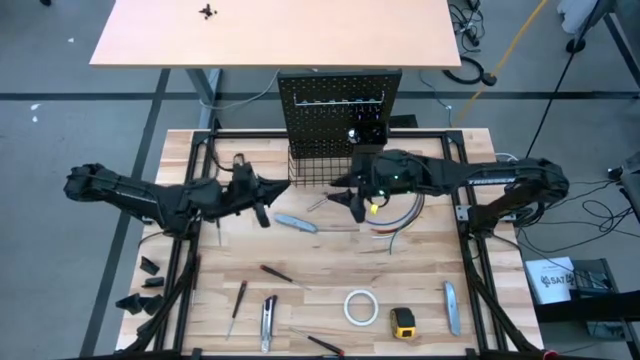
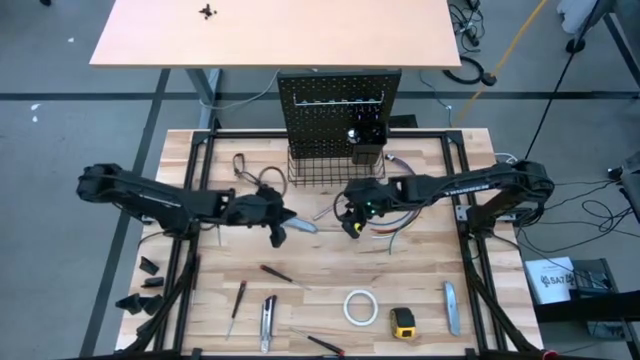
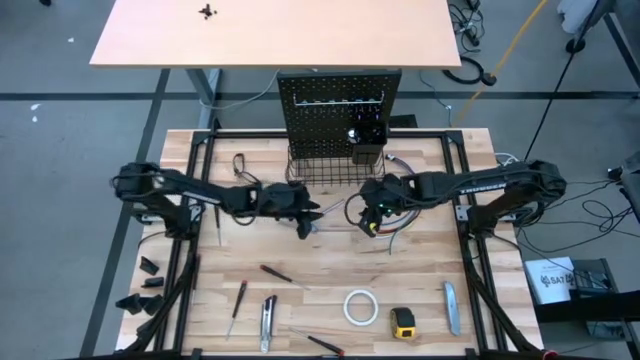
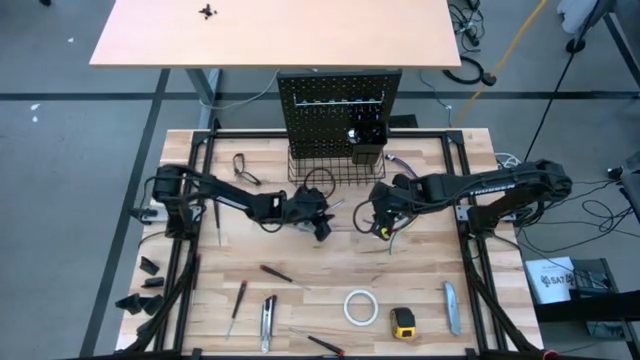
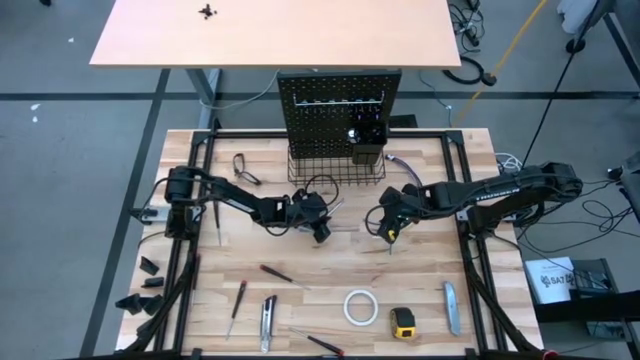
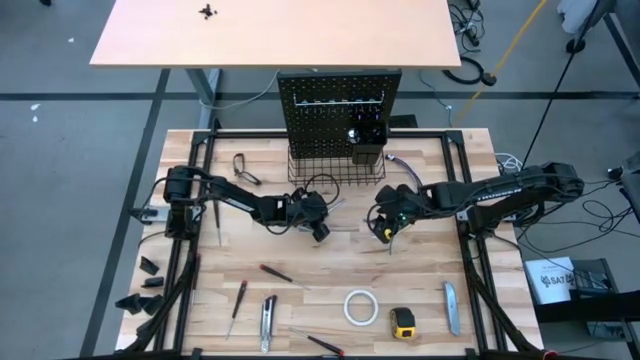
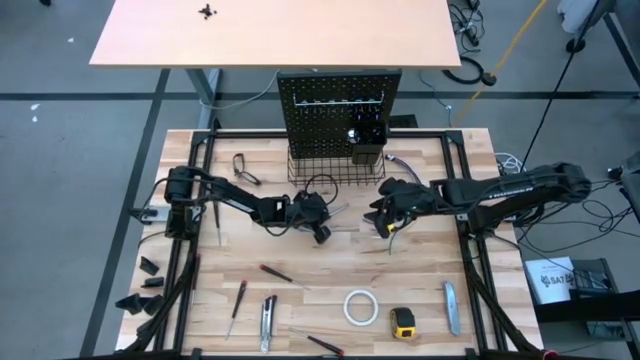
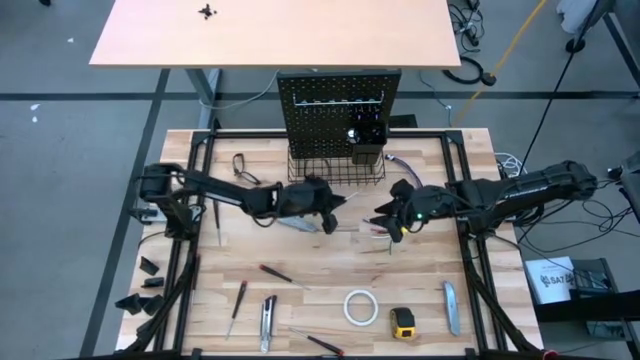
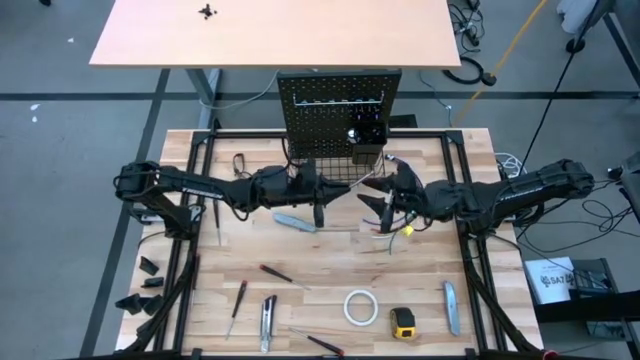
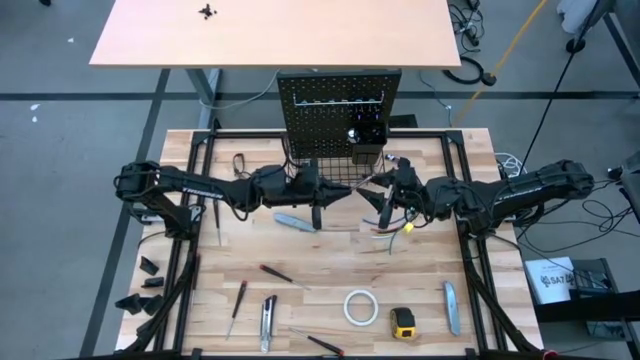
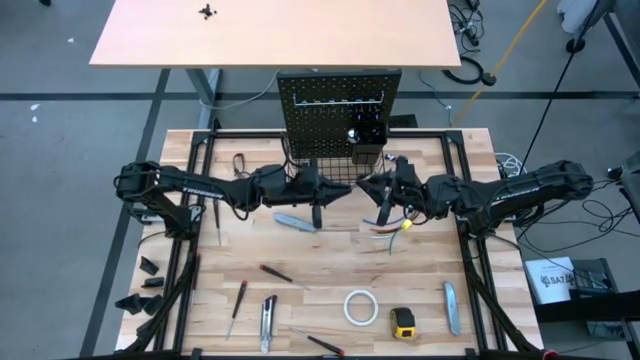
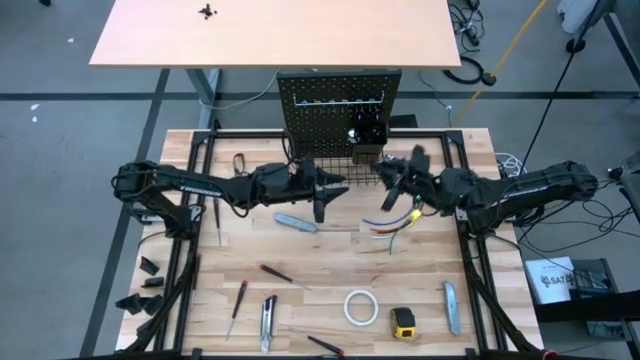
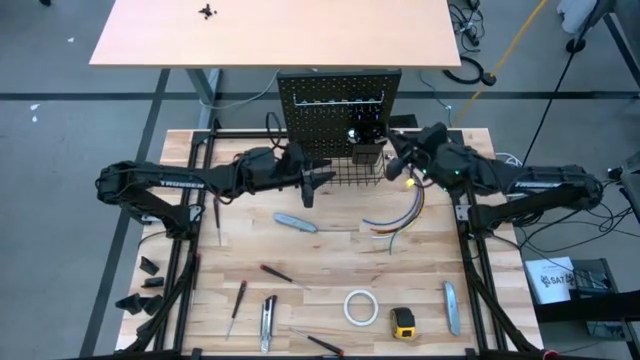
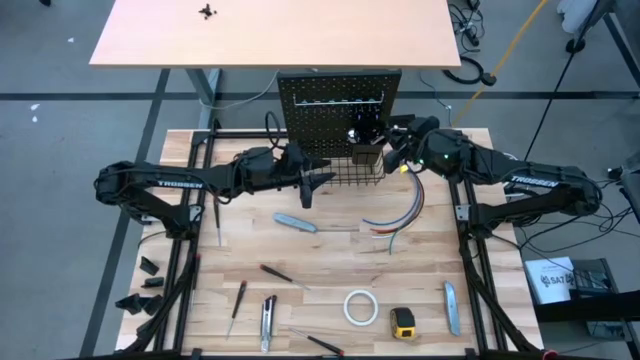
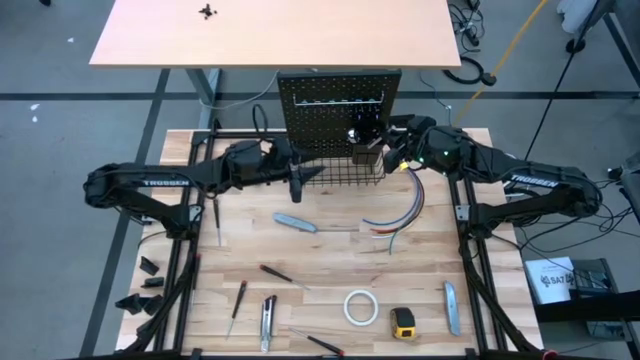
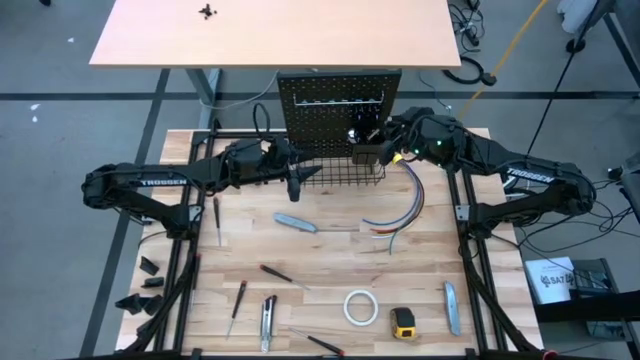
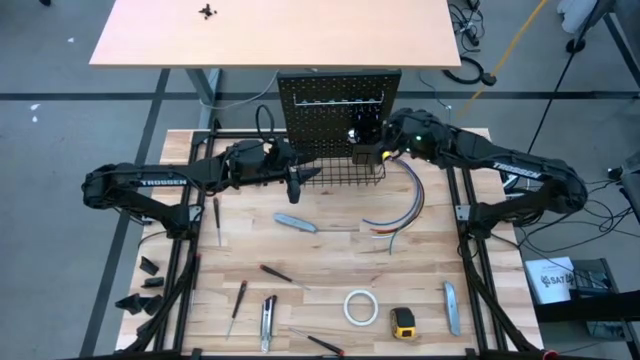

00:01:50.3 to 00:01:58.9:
Task: Hang tools onto peg board
Put the magnetic telescoping into the black bin on the pegboard

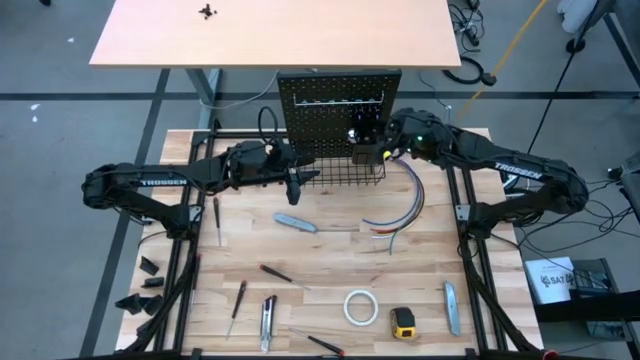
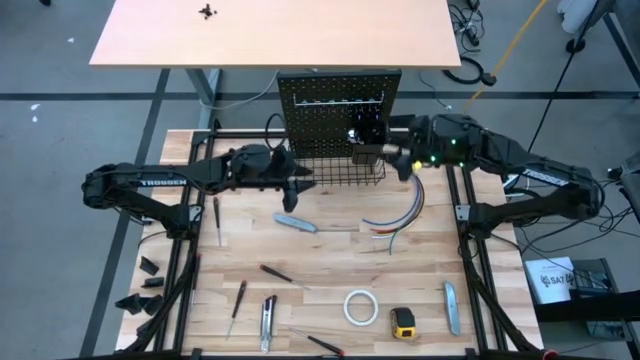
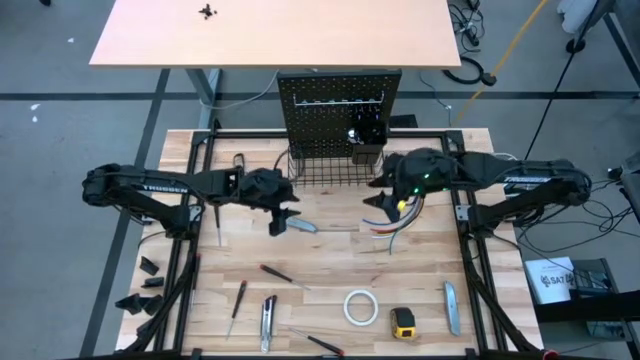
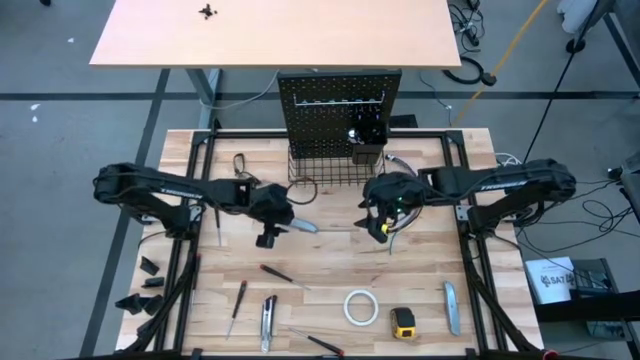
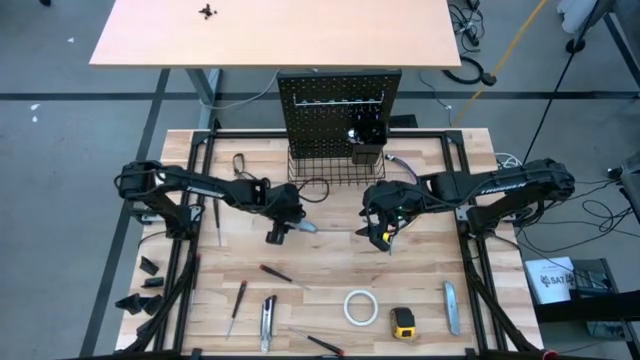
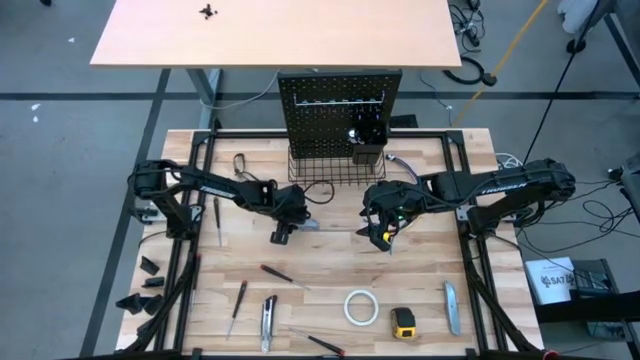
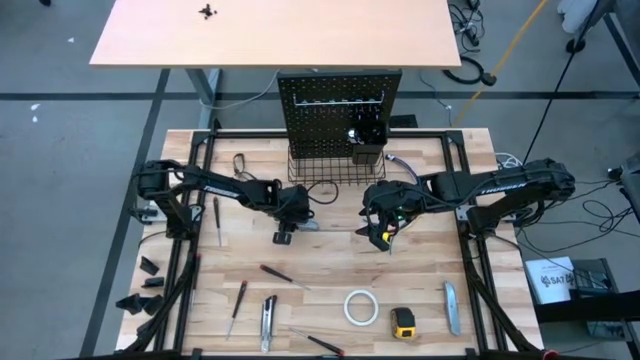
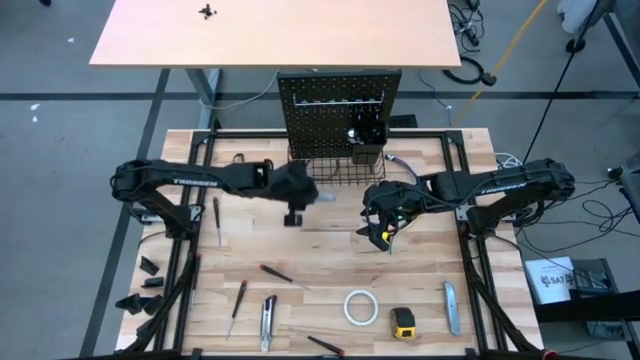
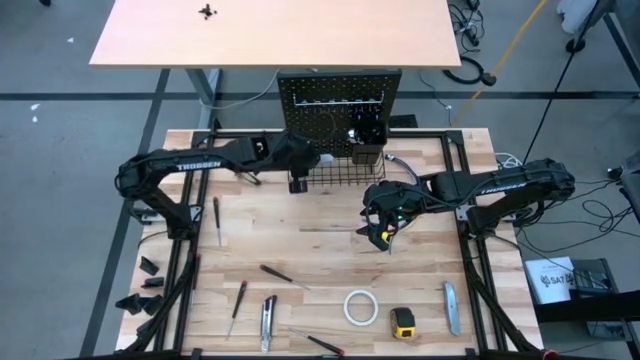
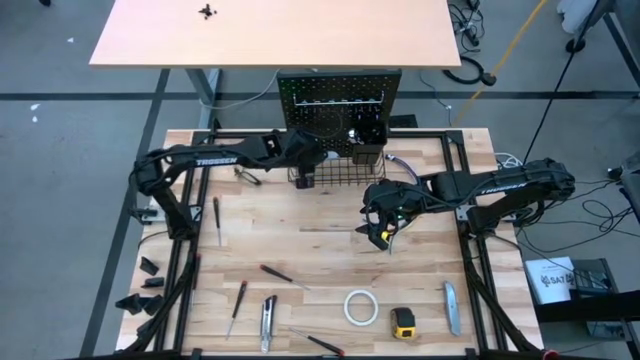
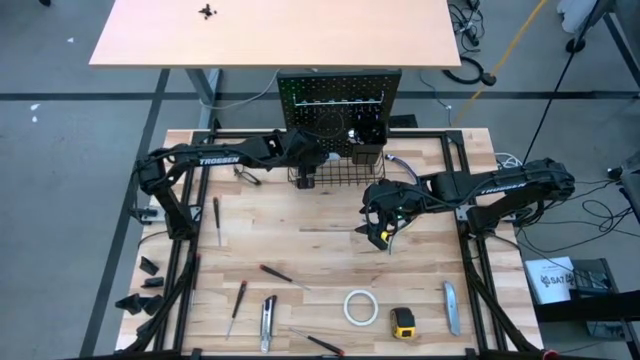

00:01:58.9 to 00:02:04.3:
Put the silver cutter into the wire basket on the pegboard

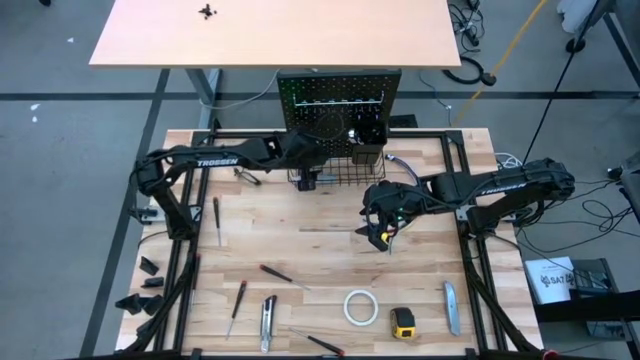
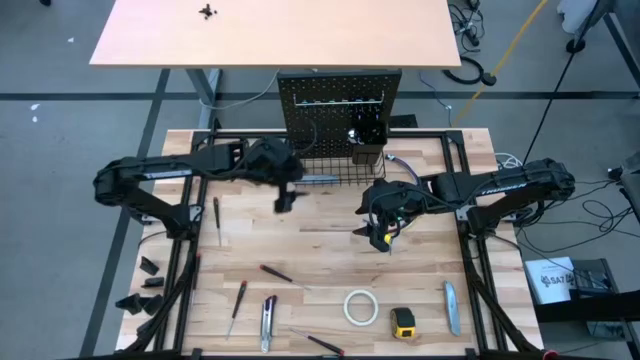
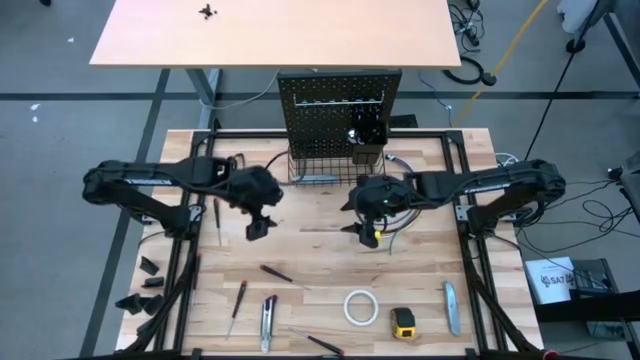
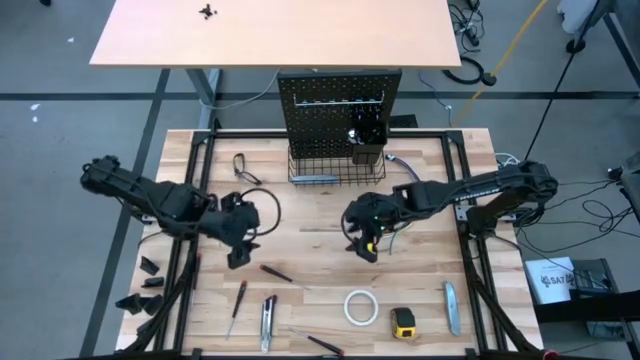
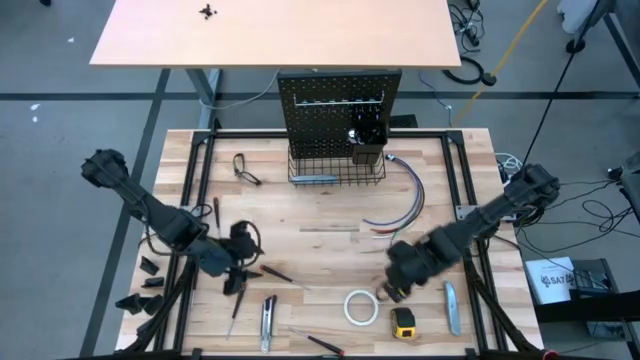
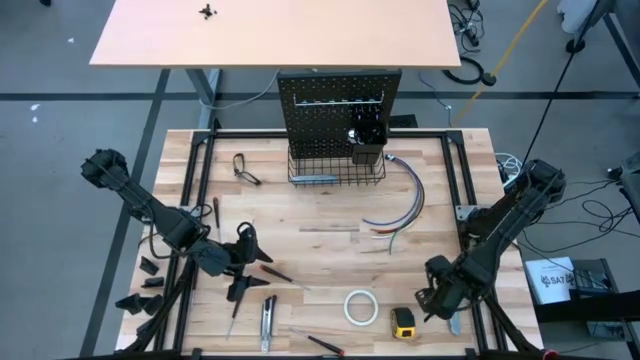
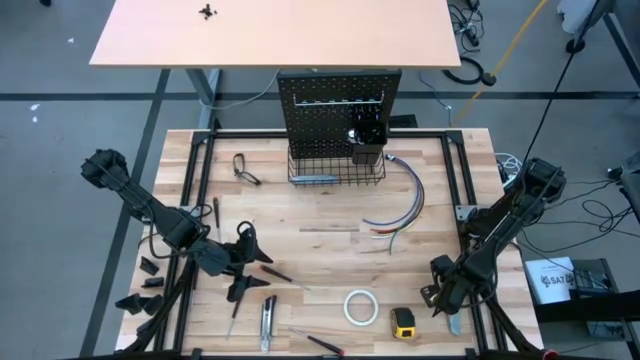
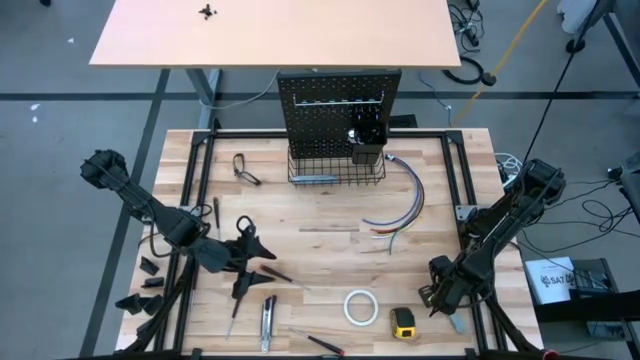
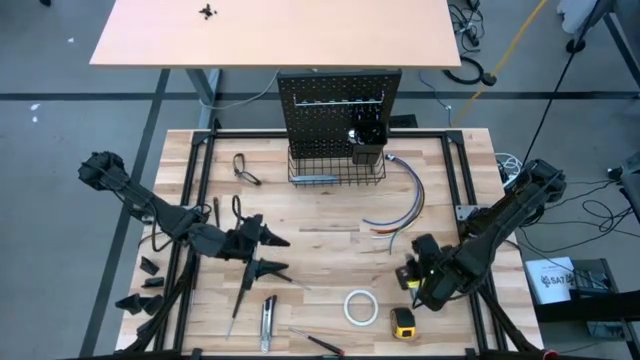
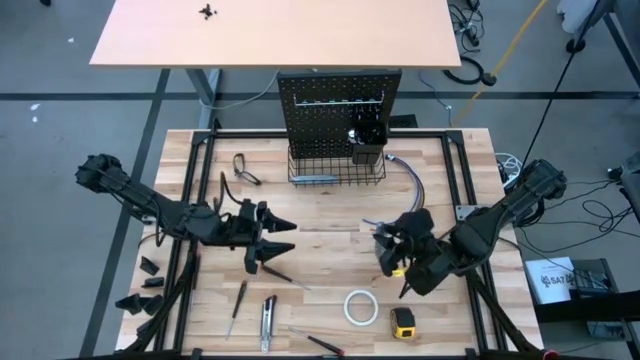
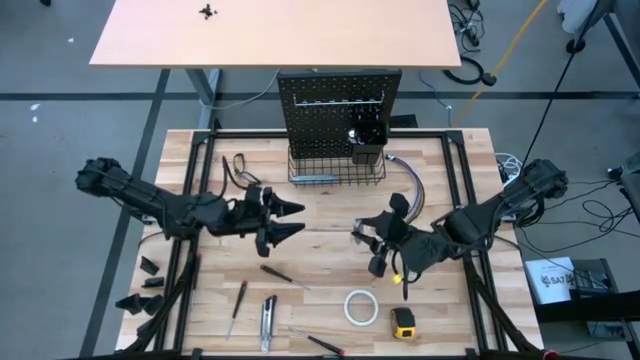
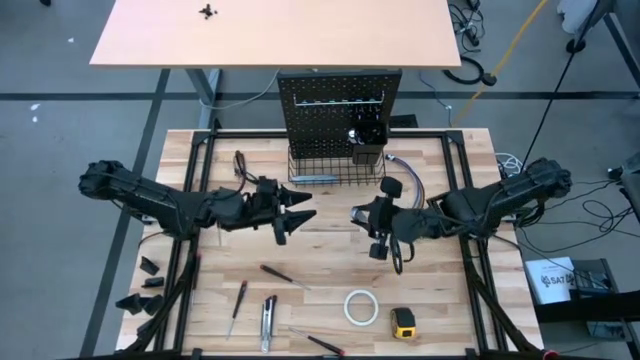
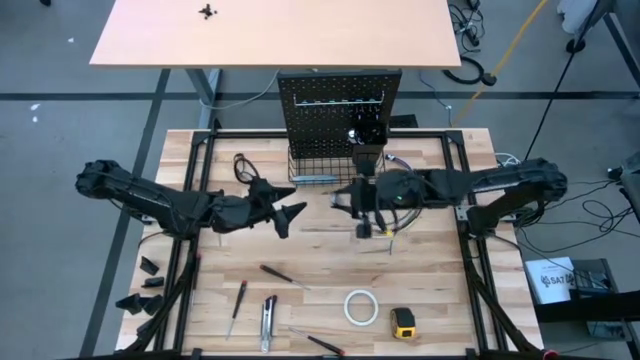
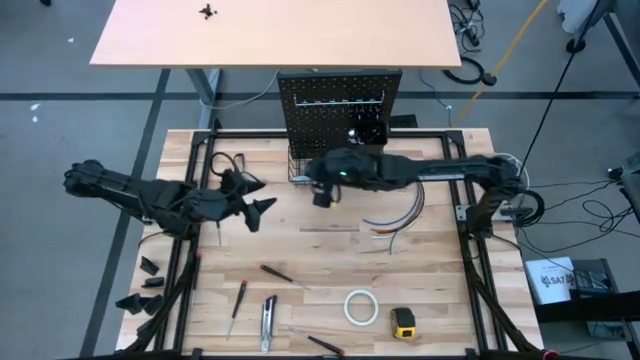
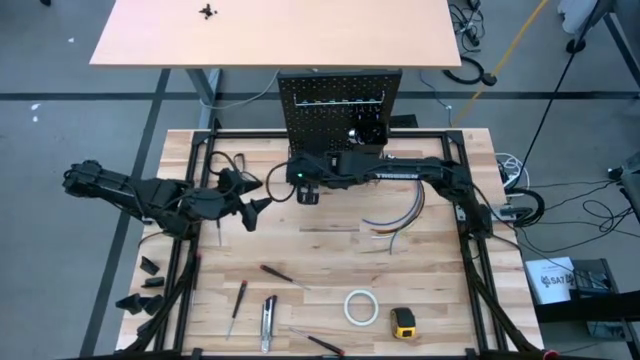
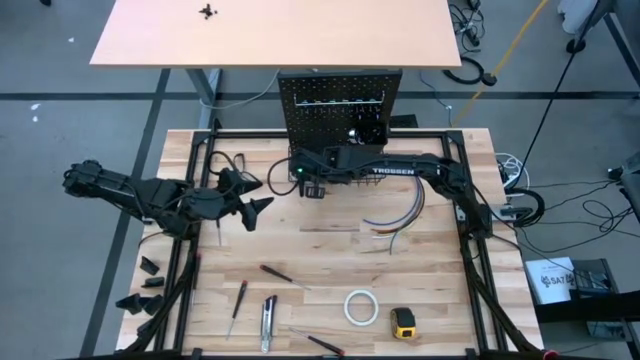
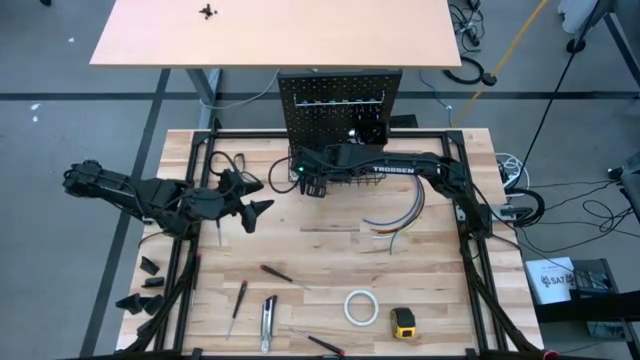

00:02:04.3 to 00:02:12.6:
Put the silver cutter into the wire basket on the pegboard
